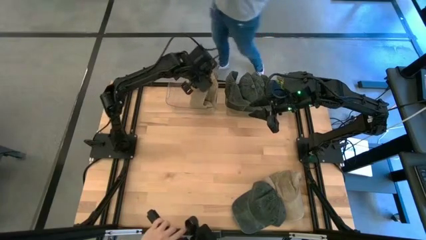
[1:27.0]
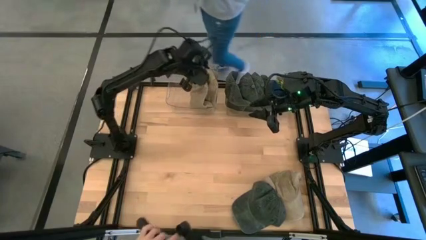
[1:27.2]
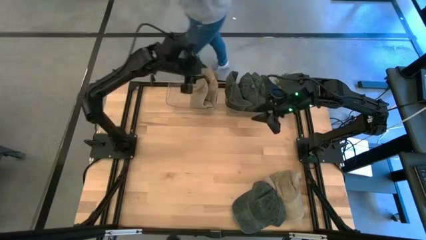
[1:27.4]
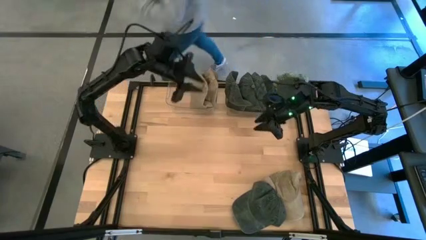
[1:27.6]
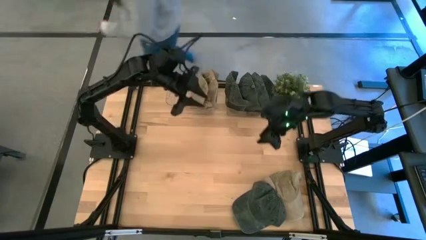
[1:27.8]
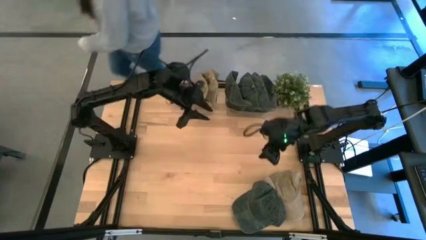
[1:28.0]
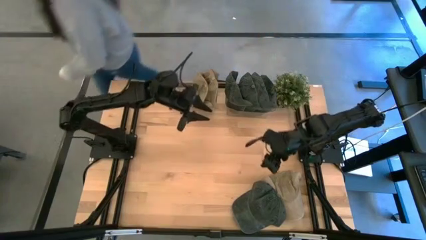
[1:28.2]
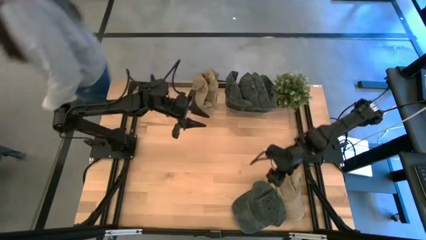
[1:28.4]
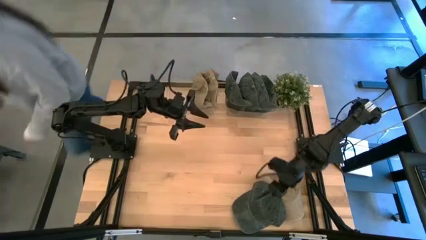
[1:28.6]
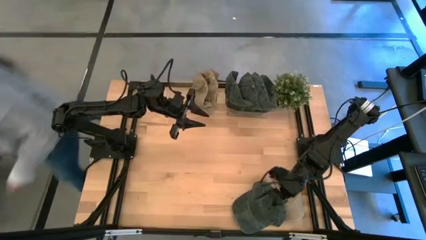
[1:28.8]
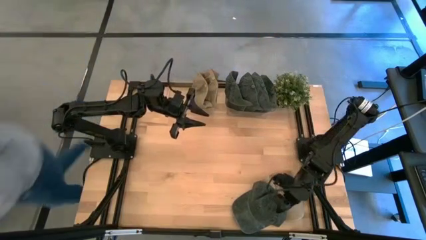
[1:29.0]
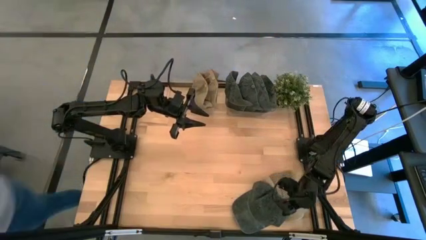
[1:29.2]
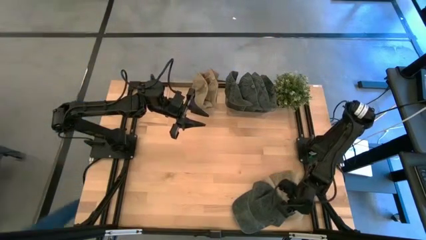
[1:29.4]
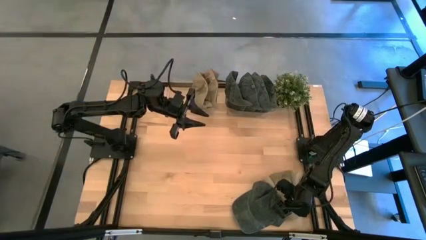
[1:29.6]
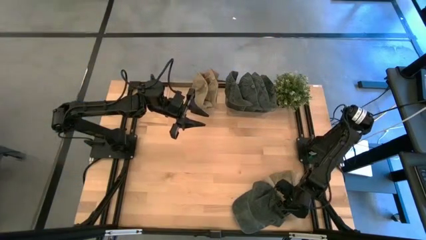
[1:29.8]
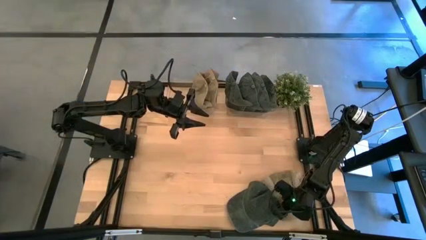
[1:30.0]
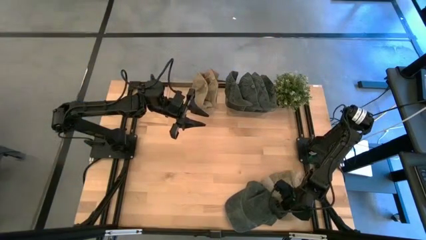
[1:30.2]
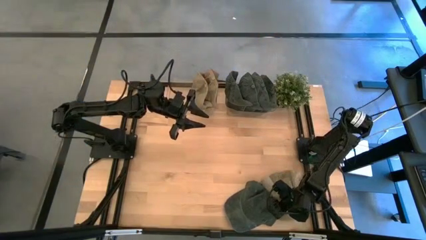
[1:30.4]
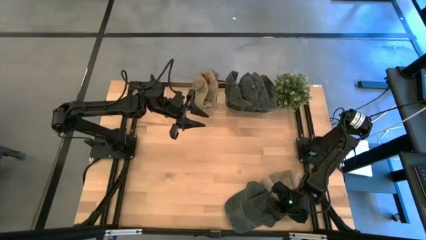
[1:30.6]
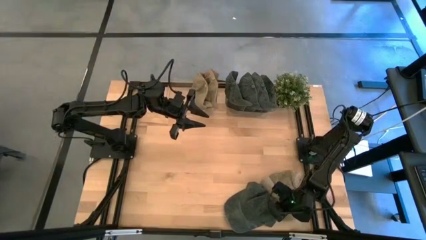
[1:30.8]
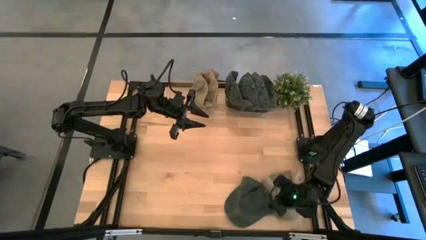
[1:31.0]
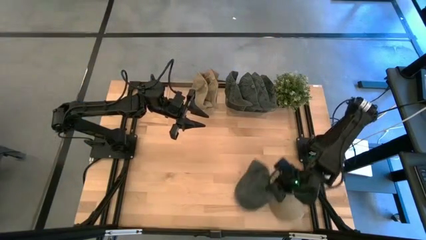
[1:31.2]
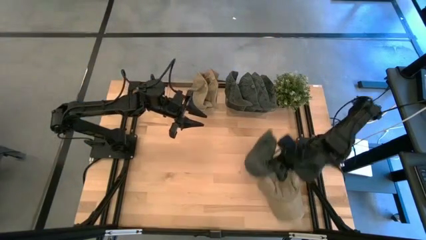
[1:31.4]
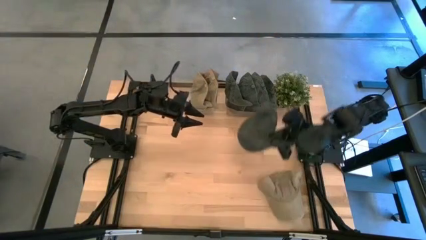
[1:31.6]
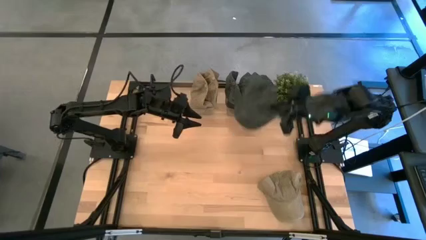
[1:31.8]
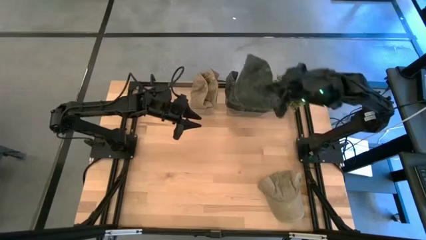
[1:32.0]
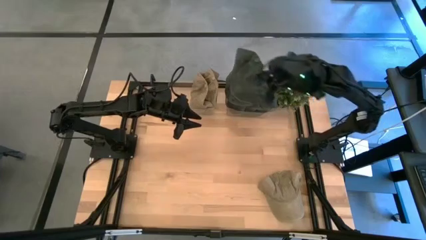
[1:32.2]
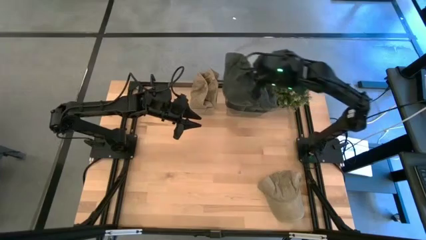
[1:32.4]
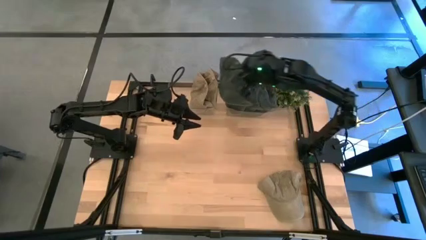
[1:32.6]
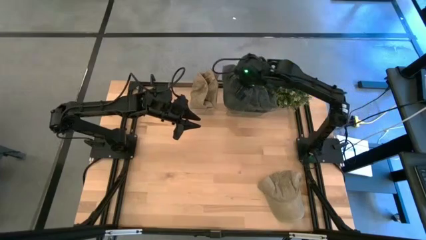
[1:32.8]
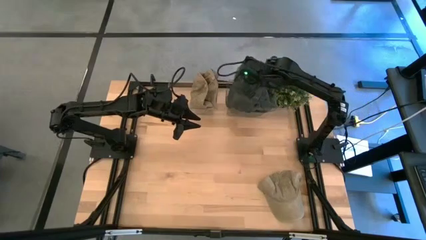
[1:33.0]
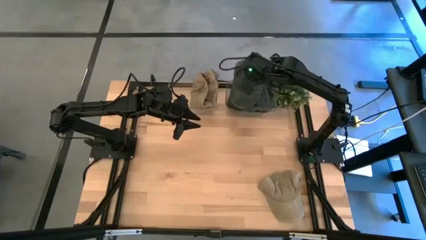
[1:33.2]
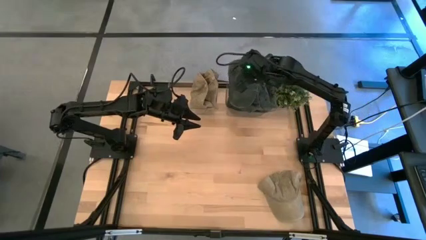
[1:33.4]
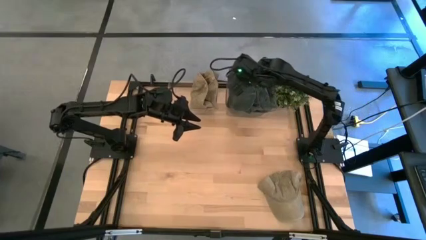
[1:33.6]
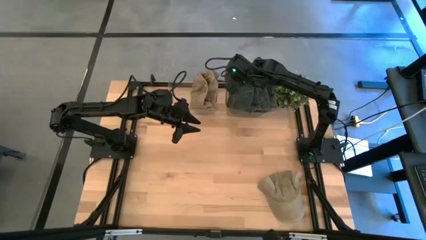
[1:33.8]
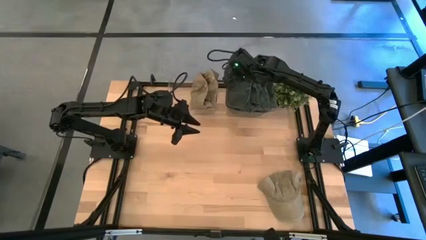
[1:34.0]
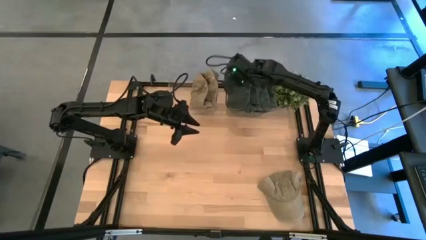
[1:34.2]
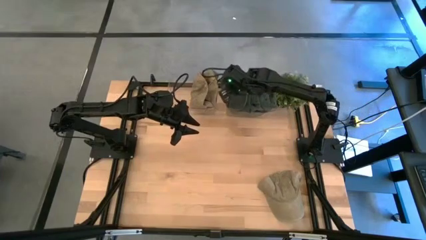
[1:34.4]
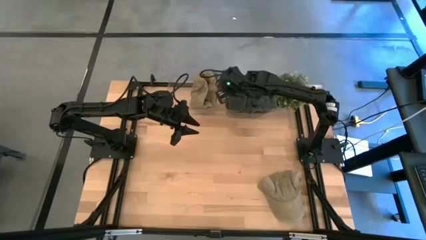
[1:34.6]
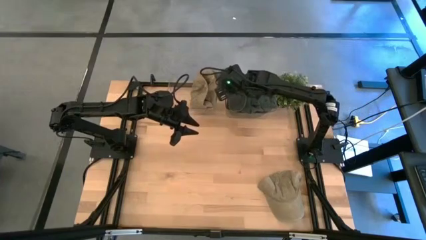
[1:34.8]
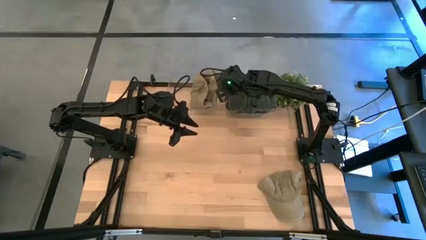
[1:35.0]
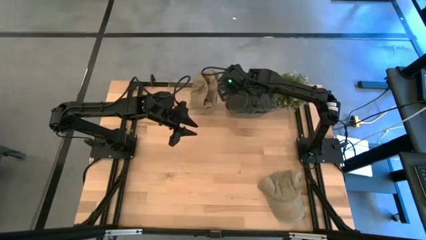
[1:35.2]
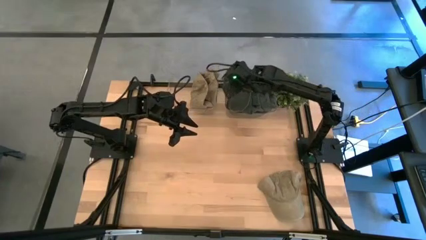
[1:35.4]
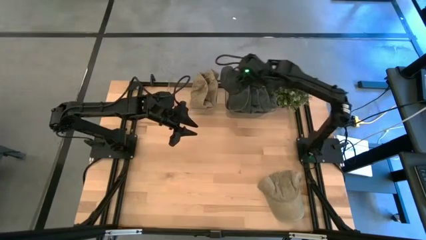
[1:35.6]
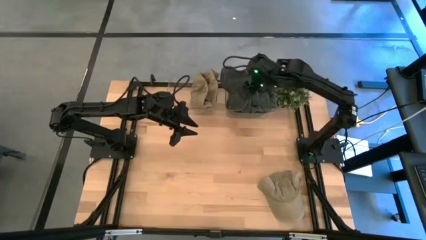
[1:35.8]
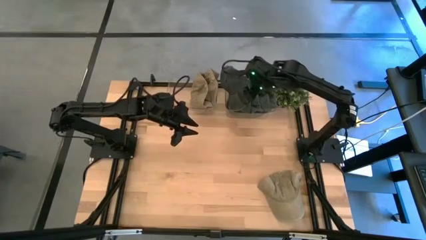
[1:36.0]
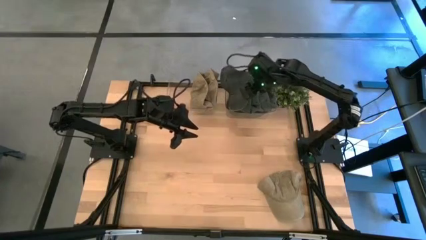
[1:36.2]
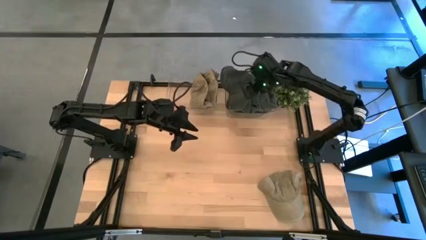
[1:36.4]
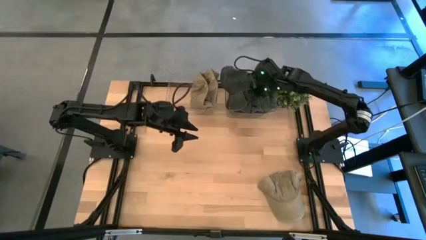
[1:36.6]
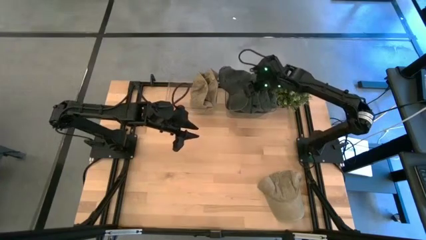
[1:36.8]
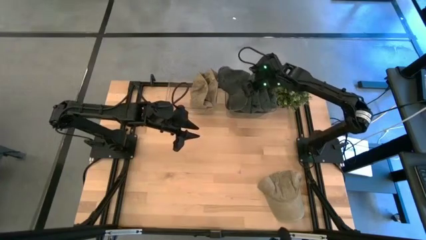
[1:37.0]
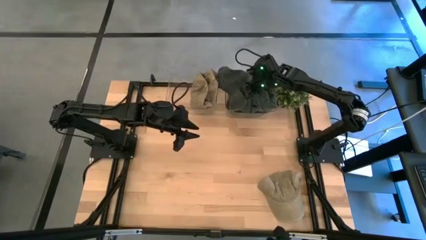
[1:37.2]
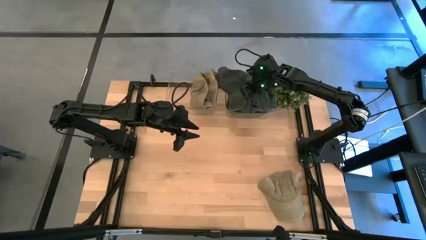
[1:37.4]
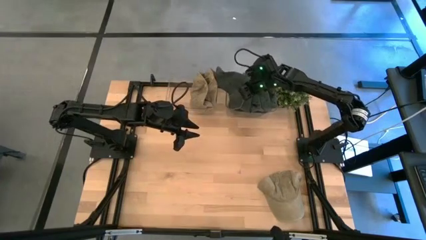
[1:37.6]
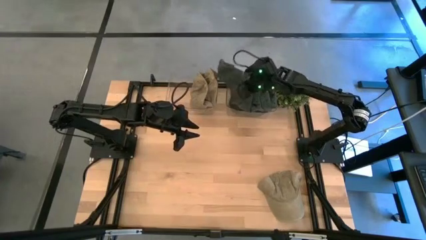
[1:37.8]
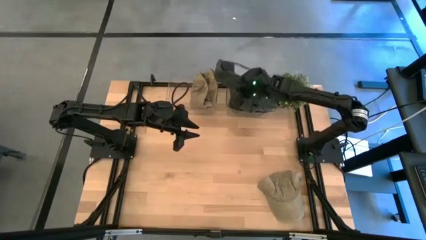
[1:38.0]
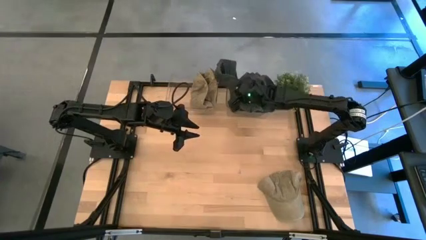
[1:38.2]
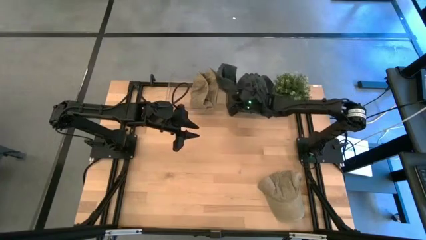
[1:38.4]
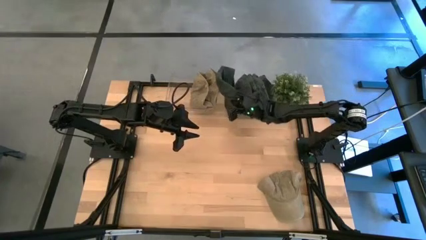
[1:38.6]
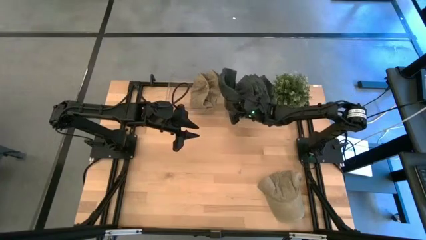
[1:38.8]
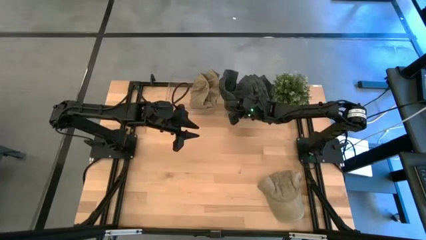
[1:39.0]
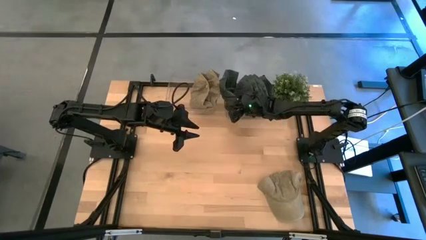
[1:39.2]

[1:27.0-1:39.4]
Task: Pick & Place hat
Put the black cap into the right transparent bin

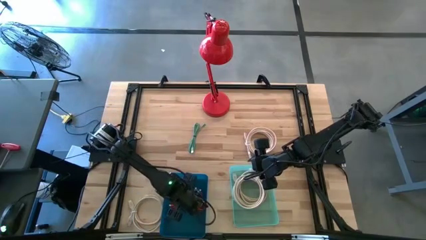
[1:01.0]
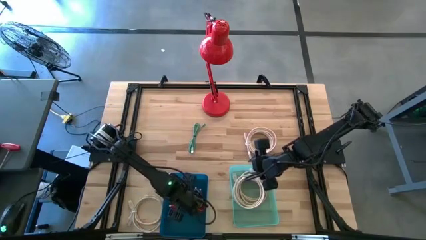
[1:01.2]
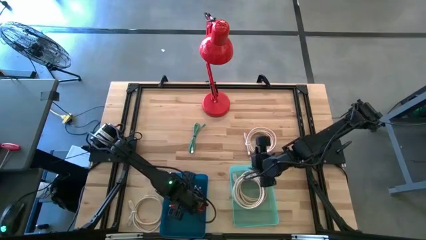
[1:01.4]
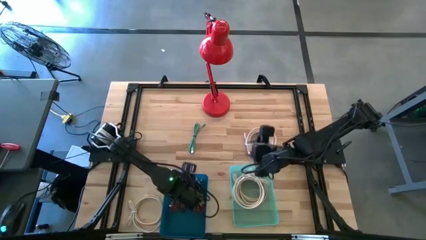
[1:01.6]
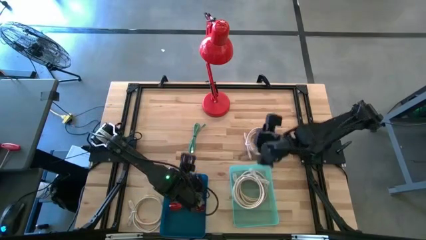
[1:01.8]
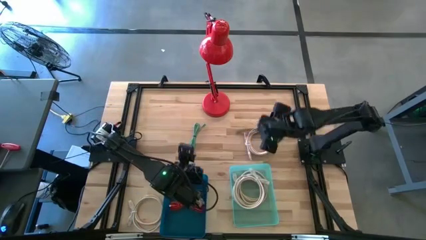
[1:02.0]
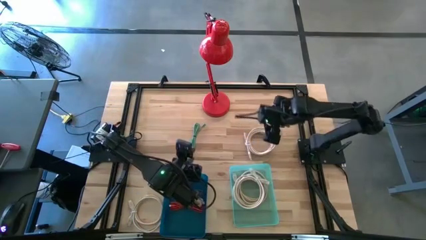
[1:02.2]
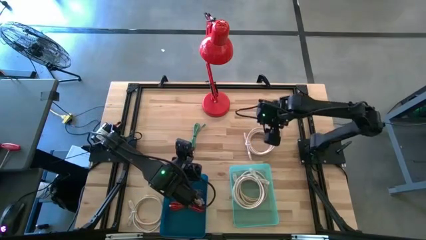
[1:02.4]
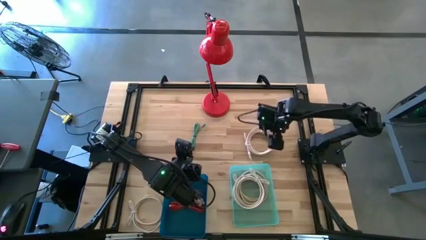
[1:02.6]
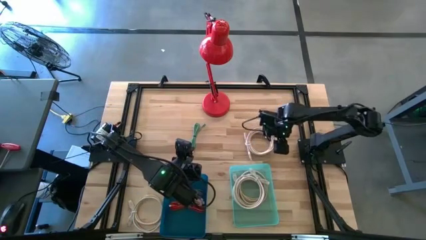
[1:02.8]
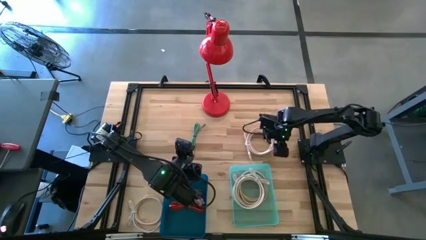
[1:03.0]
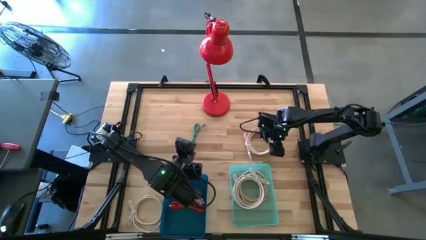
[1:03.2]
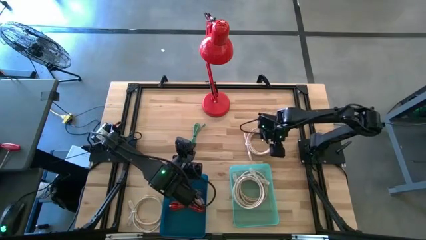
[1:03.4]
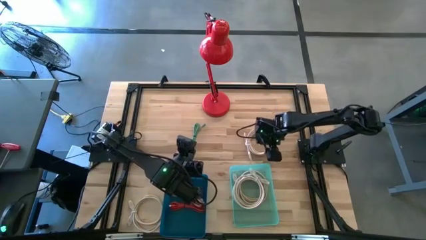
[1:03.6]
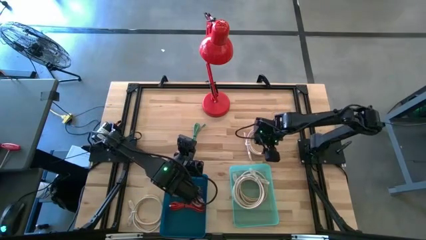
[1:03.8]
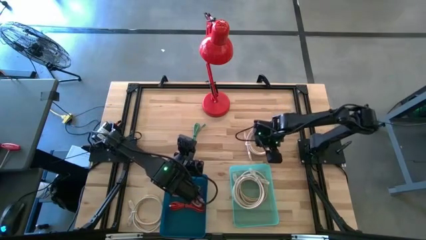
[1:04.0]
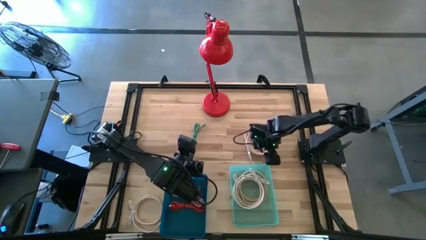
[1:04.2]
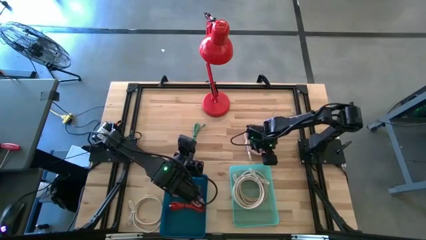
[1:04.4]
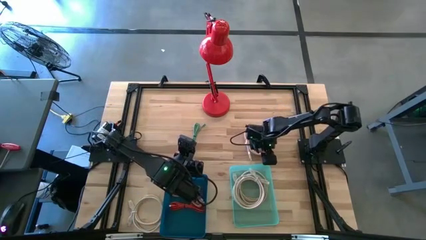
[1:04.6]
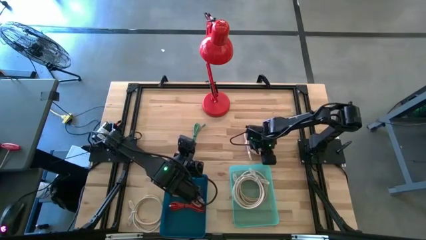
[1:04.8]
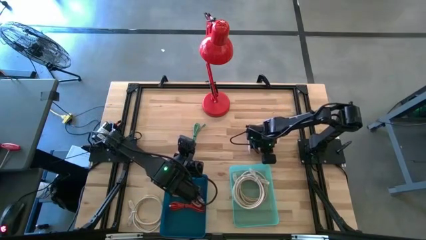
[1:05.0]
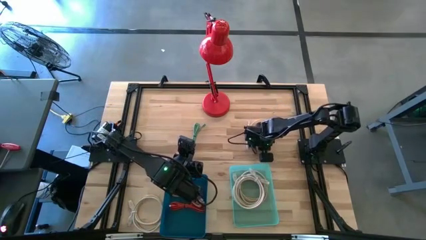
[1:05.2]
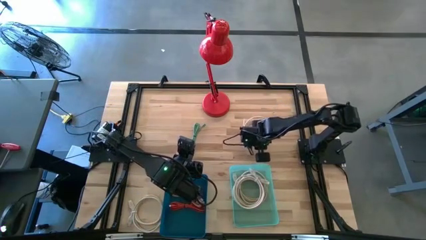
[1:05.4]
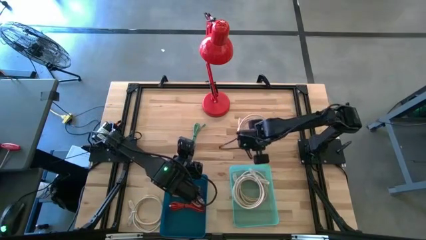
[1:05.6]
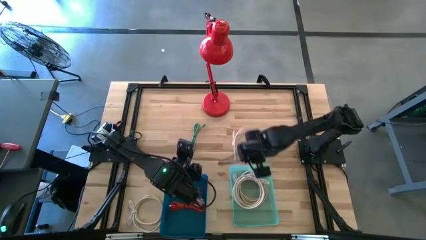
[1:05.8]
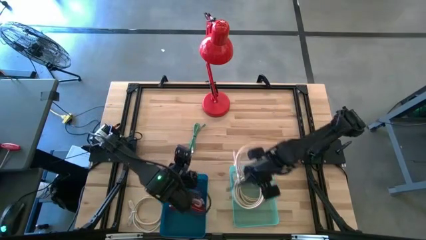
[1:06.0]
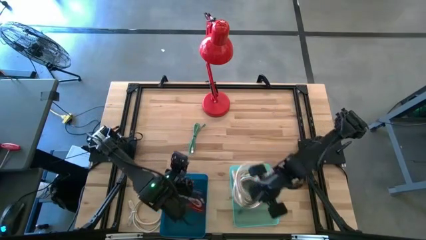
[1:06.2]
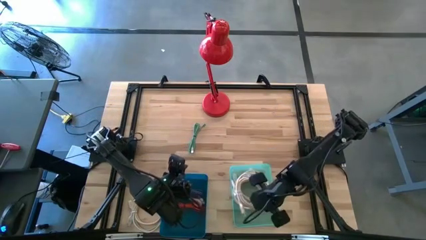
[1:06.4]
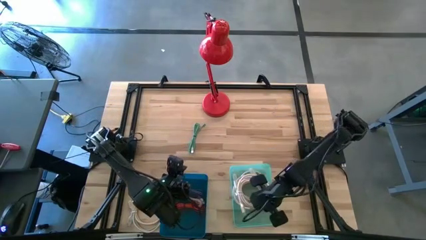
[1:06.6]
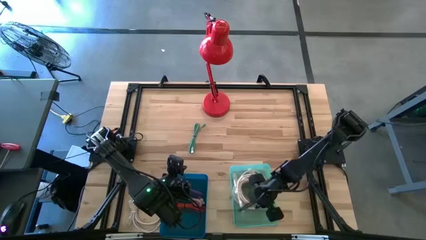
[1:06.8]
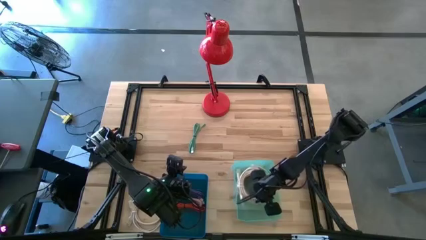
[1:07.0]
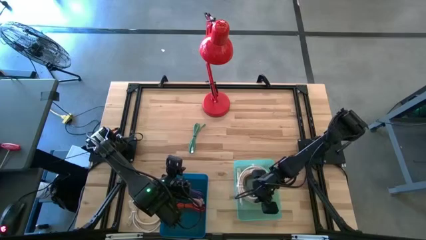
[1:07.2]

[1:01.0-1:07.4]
Task: Pick & Place USB Port
Put the white USB cable into the green bin
